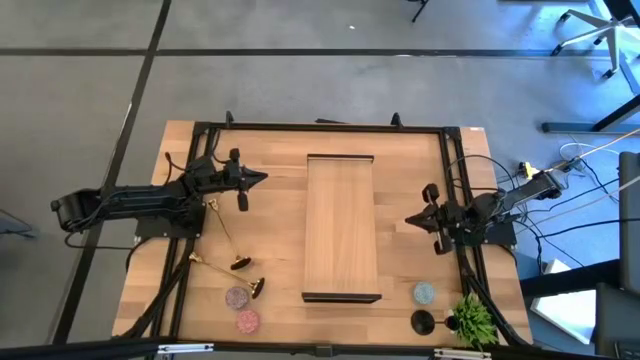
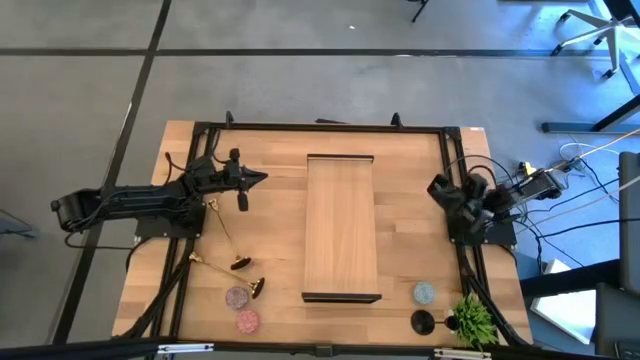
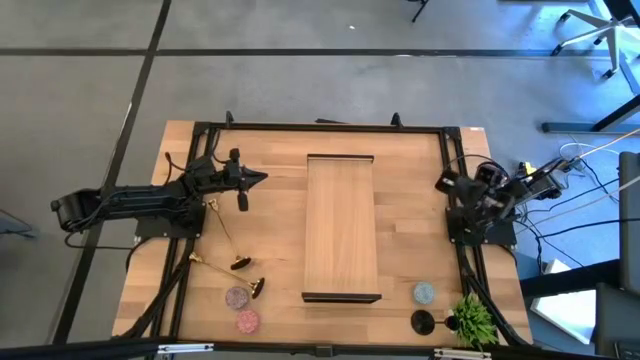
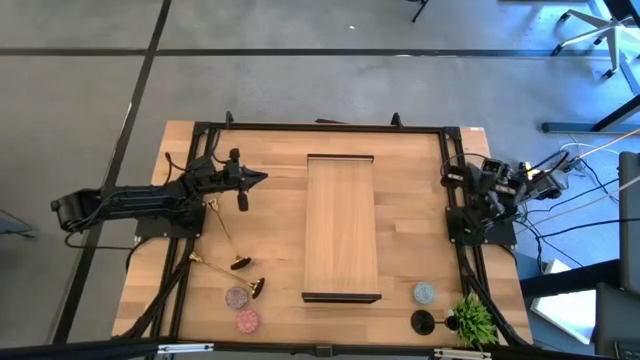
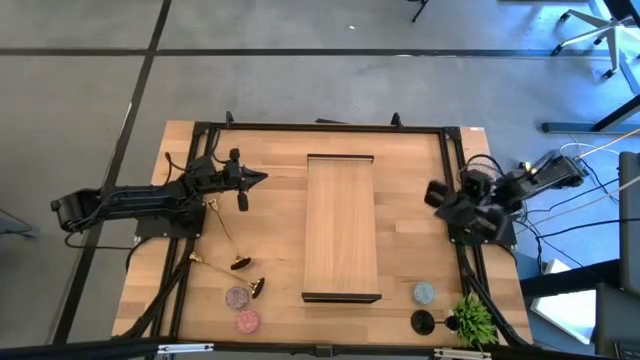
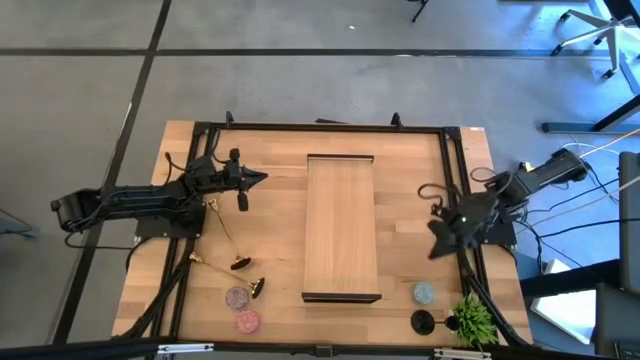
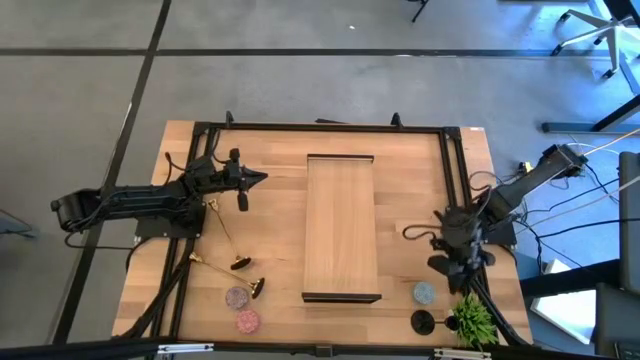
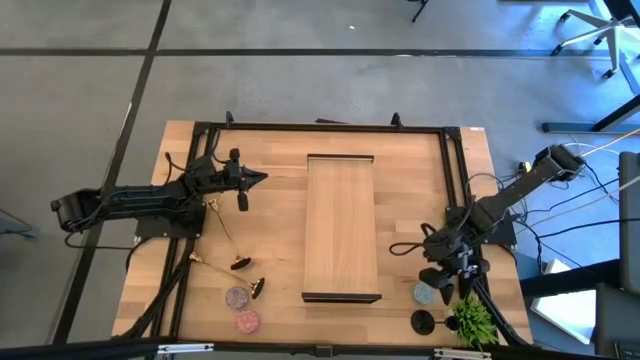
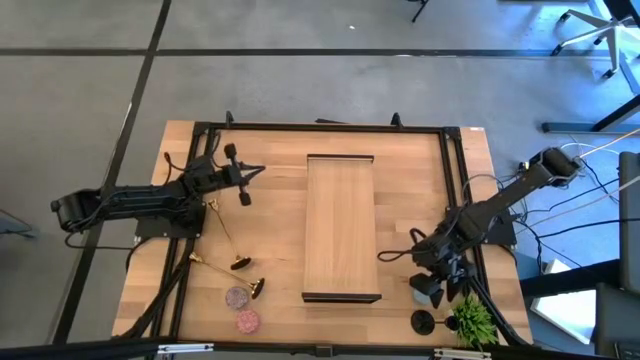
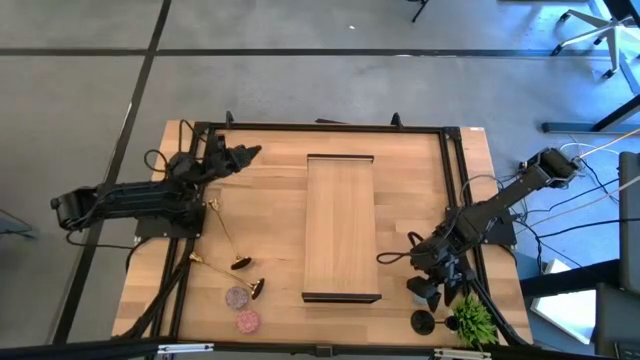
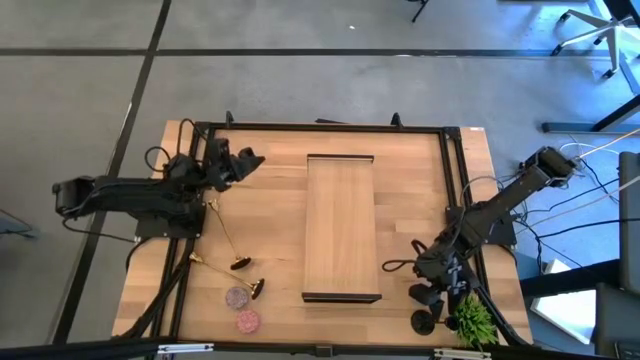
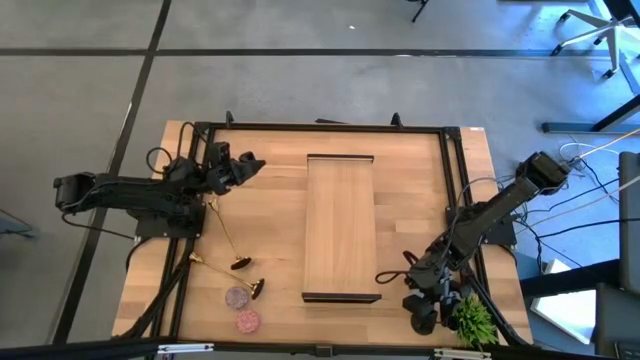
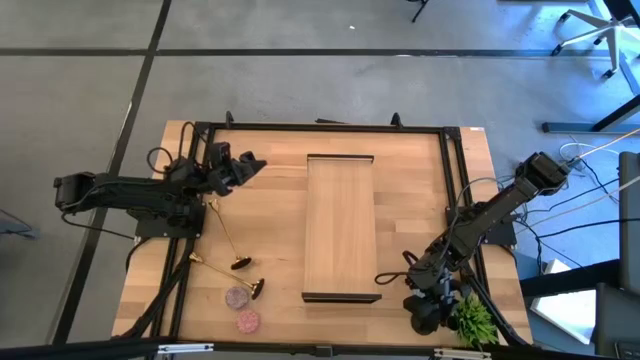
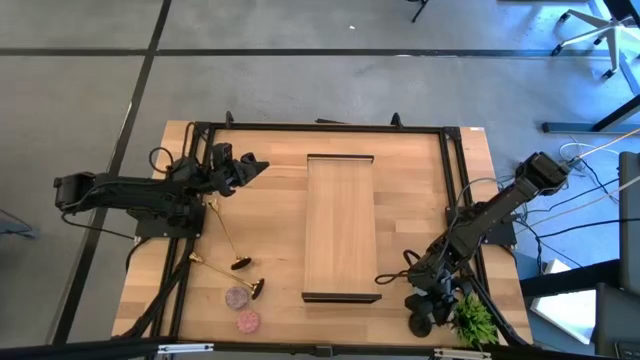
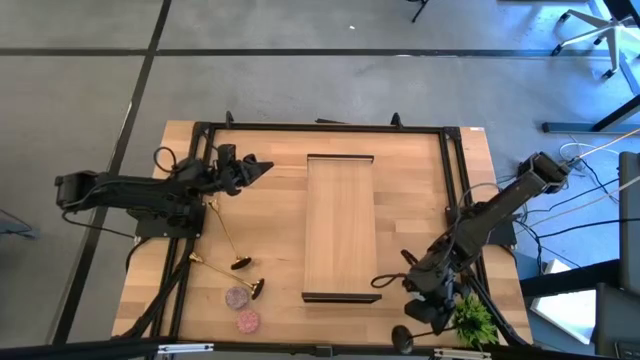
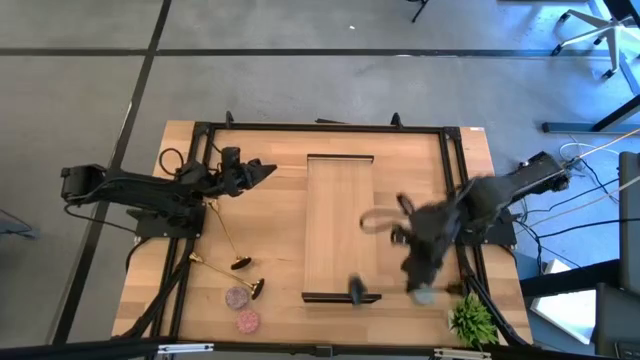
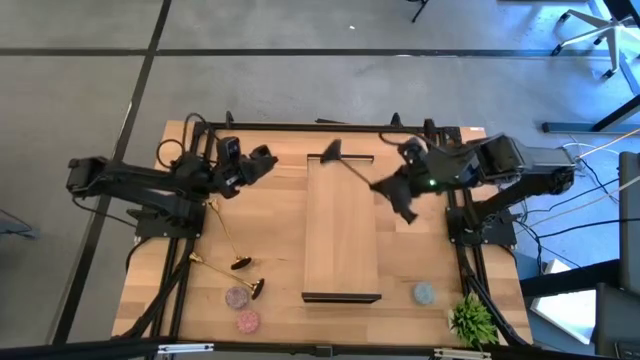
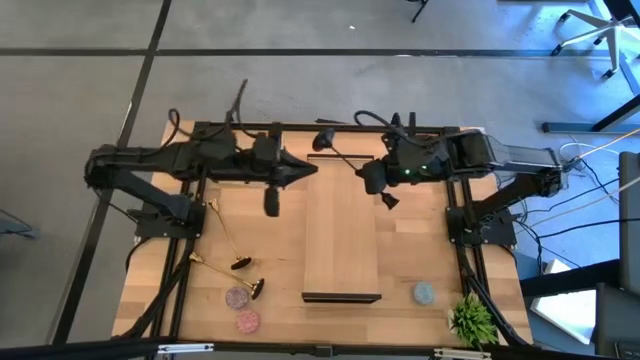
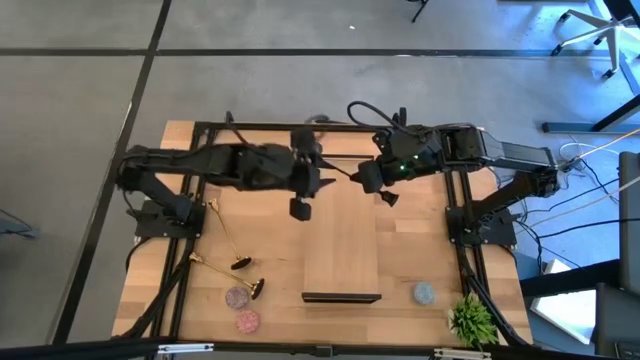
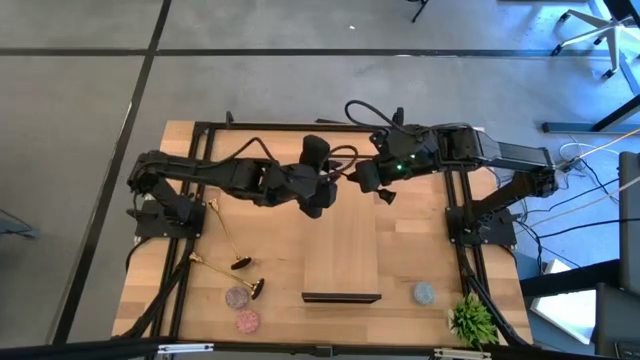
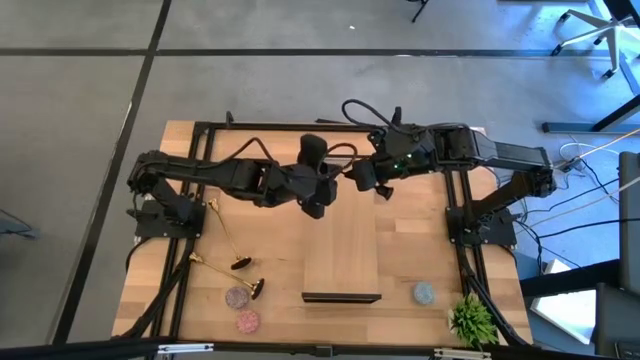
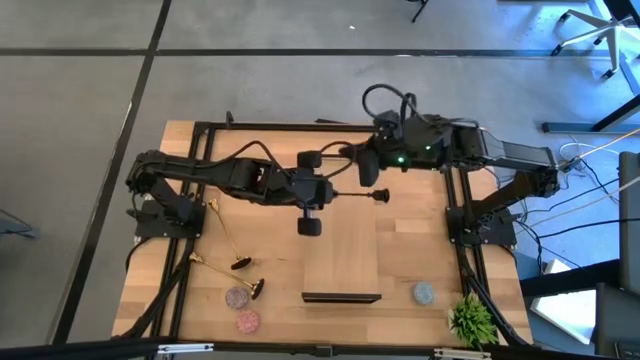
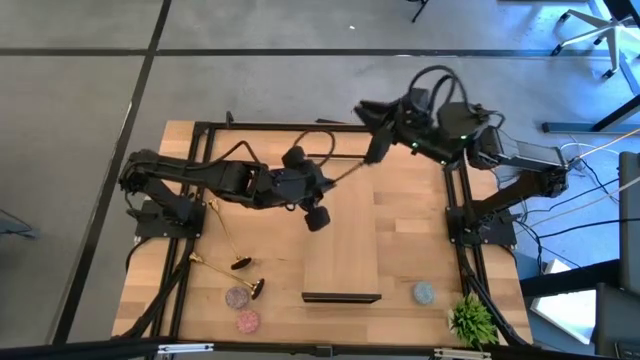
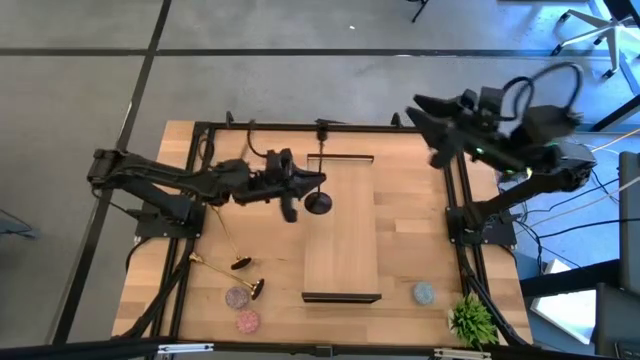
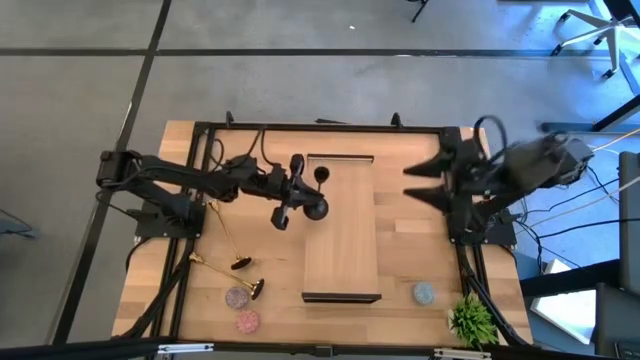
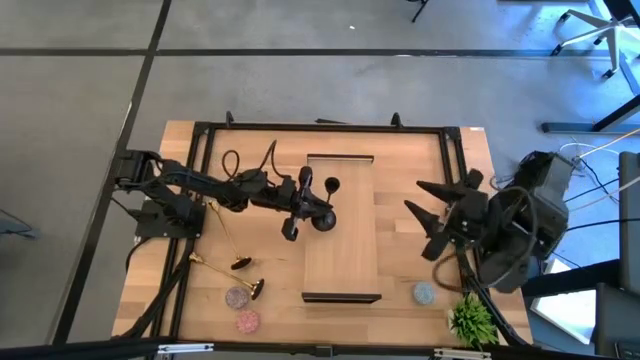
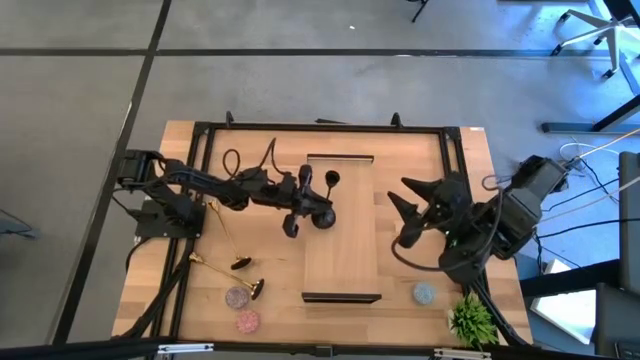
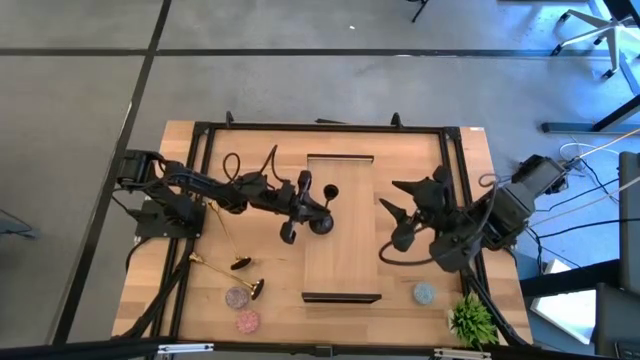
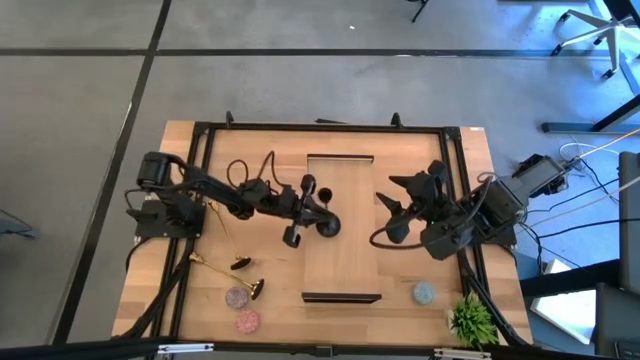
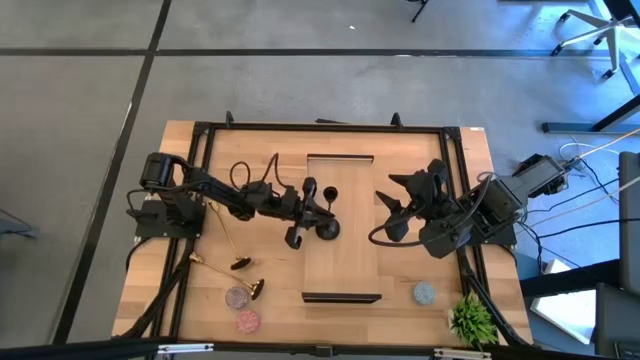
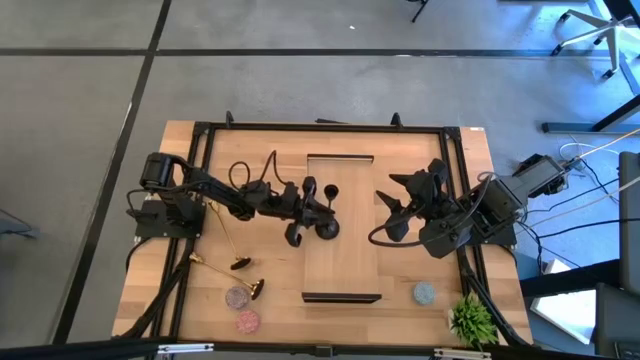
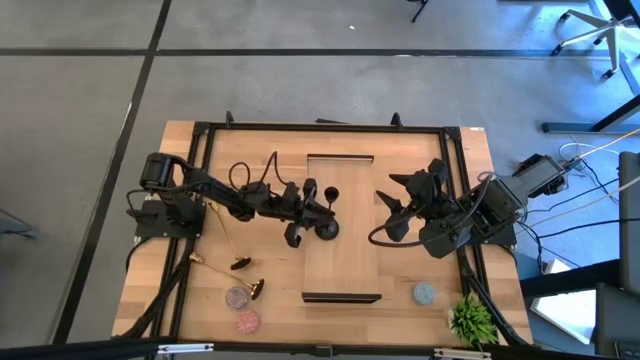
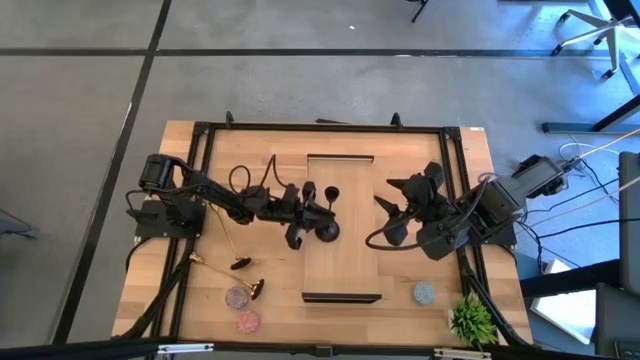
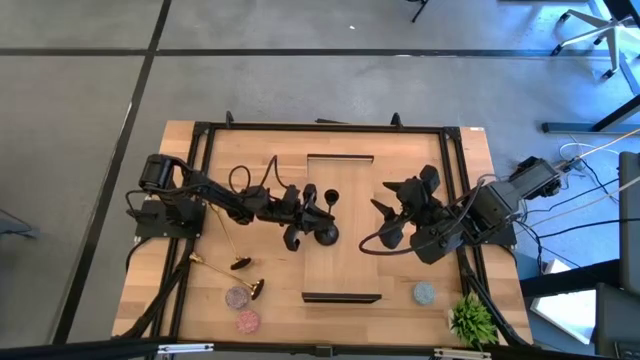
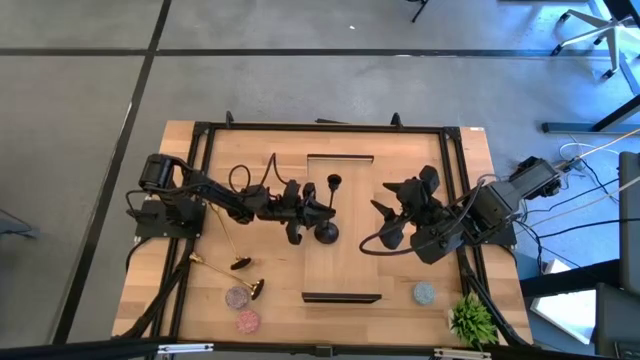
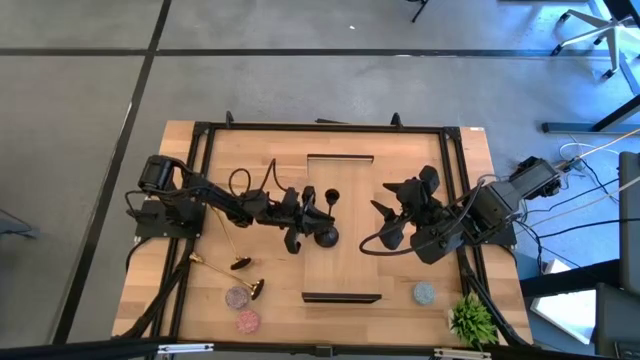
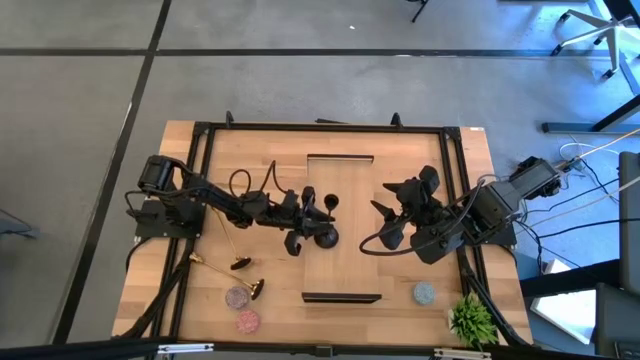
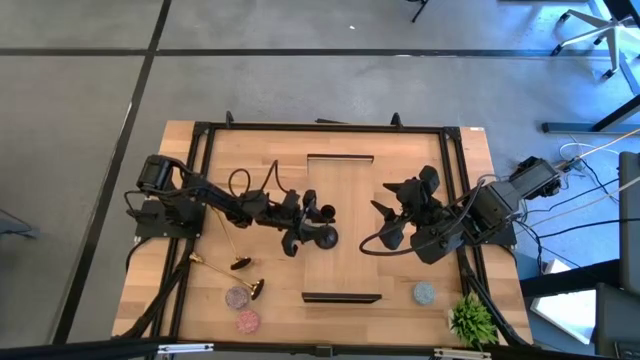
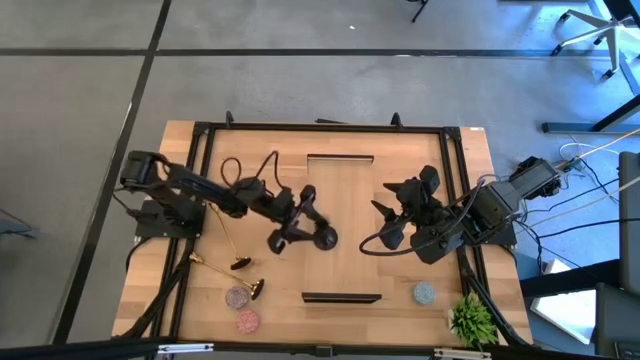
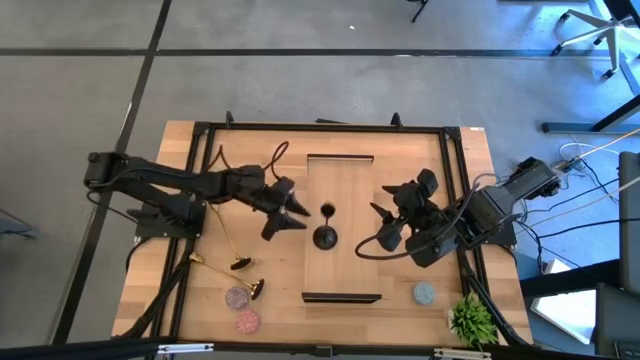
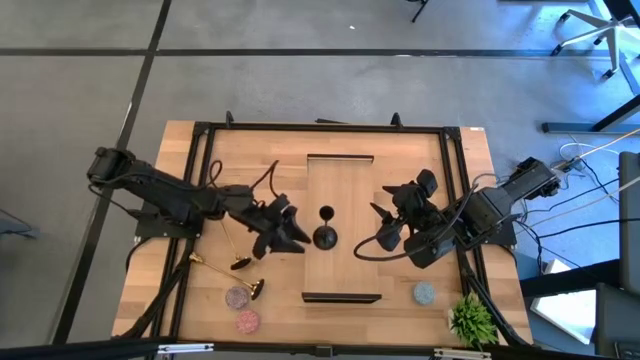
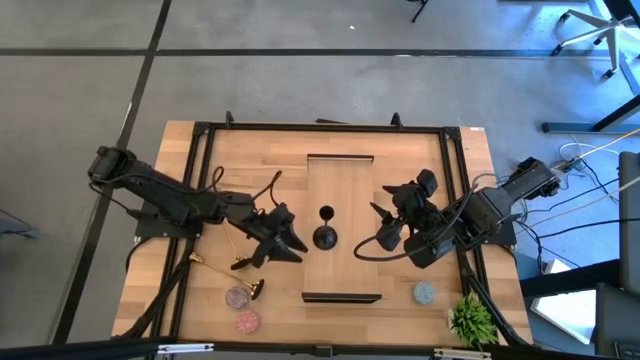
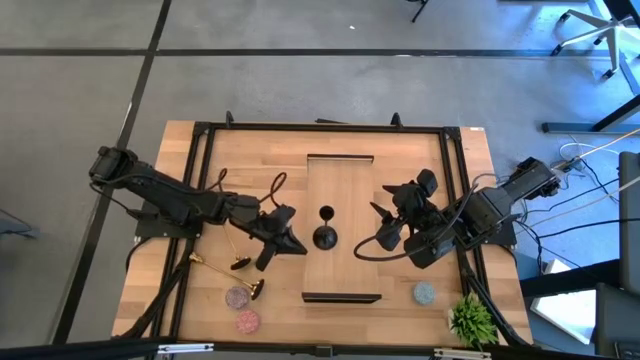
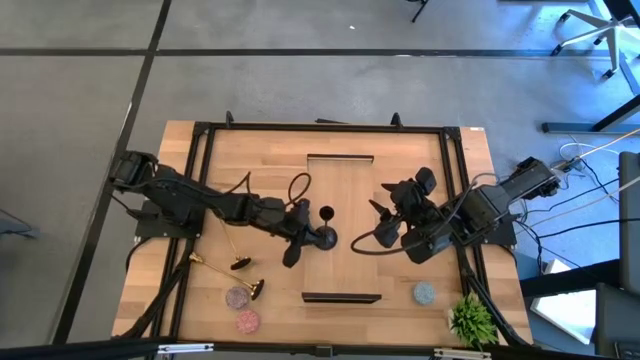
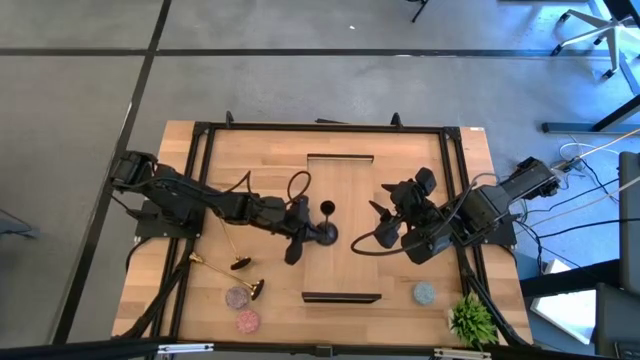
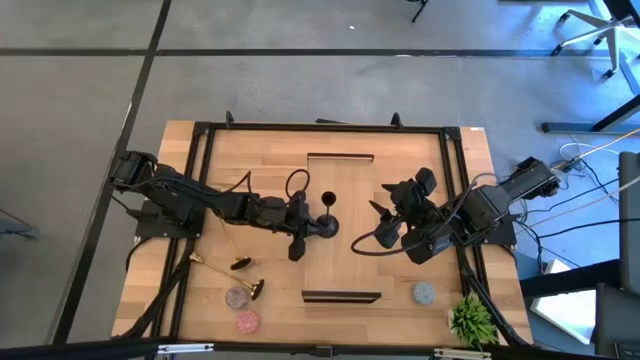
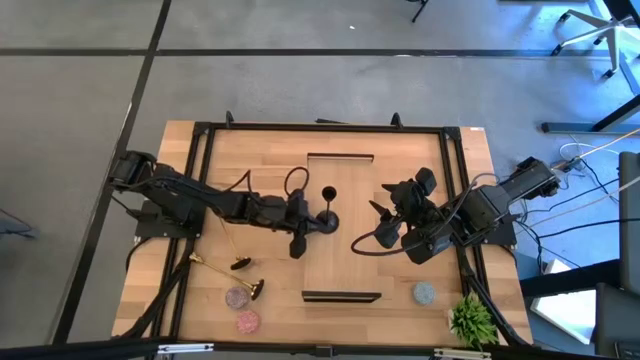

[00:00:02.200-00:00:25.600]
Task: Pick & Place candle stick holders
Put the black candleholder on the shelf
